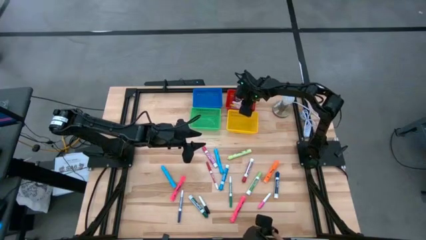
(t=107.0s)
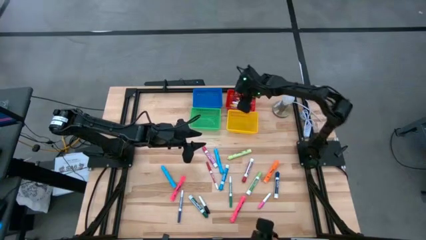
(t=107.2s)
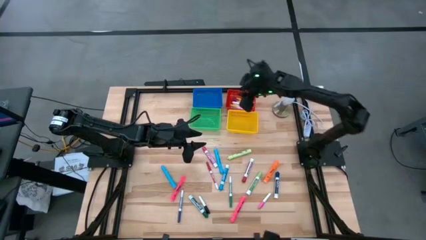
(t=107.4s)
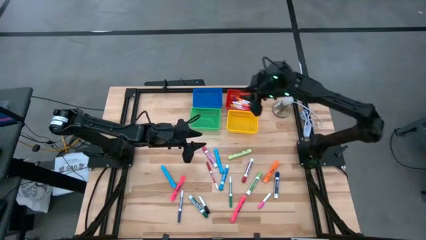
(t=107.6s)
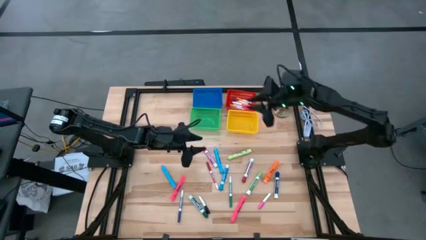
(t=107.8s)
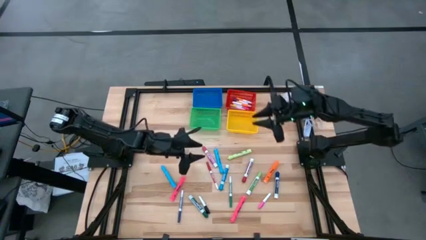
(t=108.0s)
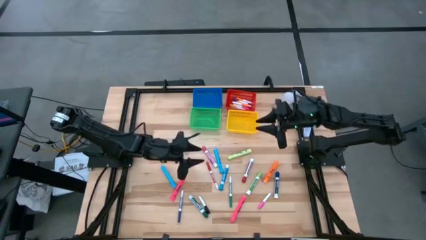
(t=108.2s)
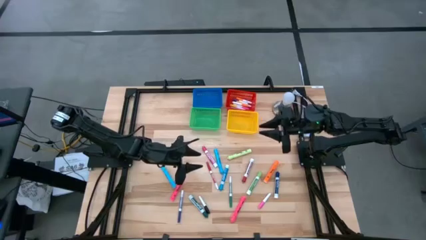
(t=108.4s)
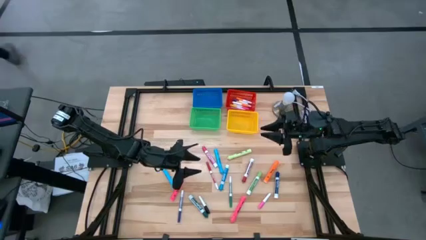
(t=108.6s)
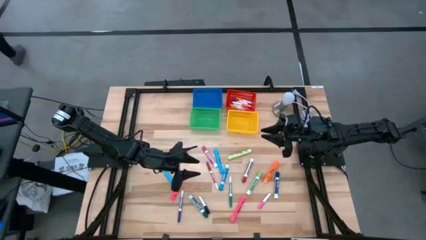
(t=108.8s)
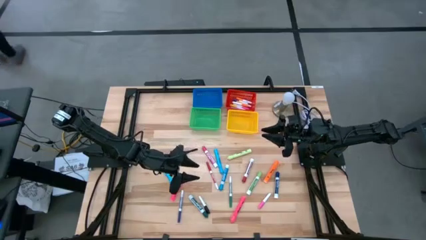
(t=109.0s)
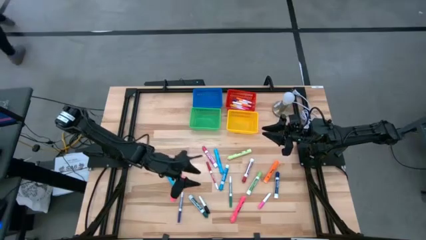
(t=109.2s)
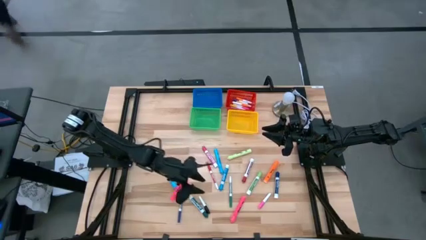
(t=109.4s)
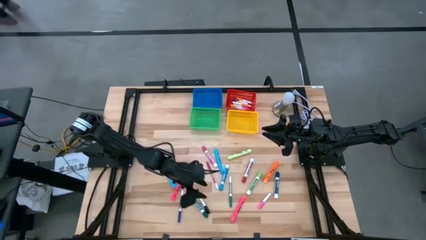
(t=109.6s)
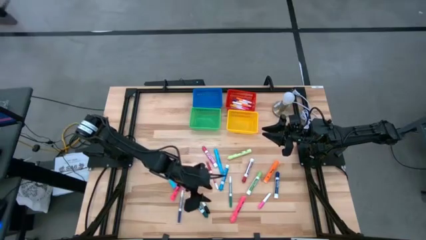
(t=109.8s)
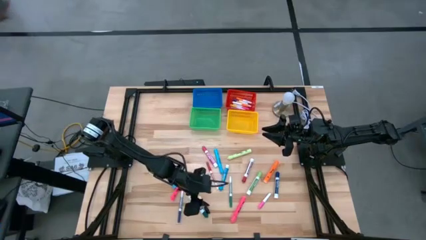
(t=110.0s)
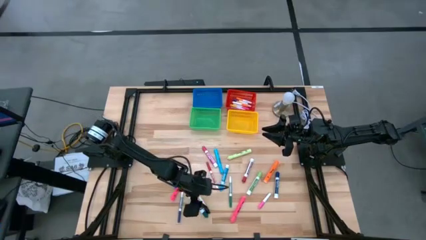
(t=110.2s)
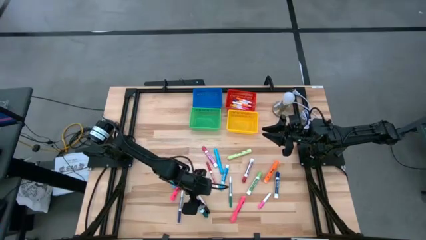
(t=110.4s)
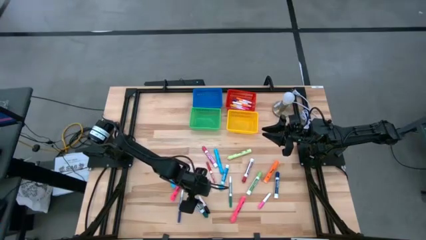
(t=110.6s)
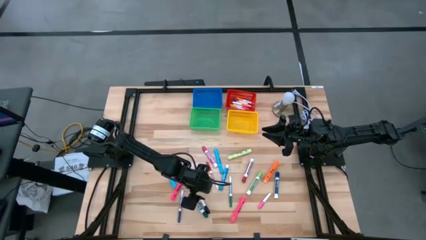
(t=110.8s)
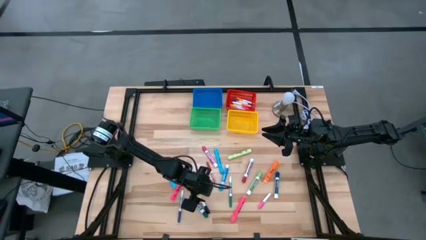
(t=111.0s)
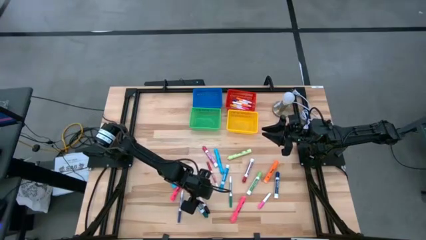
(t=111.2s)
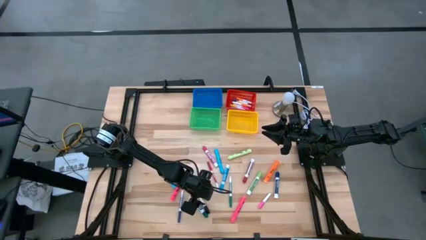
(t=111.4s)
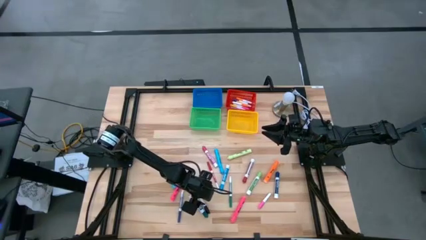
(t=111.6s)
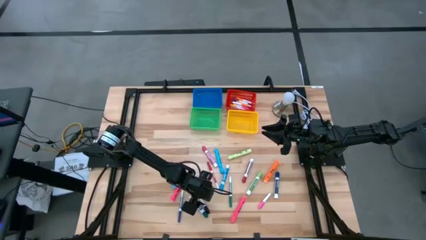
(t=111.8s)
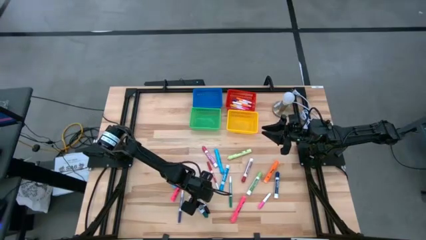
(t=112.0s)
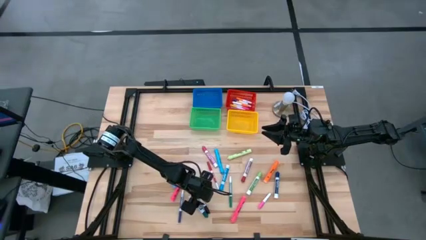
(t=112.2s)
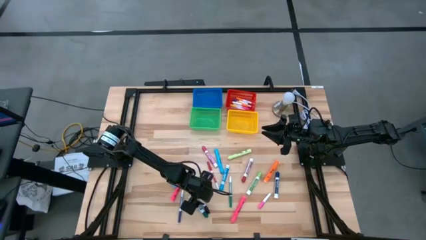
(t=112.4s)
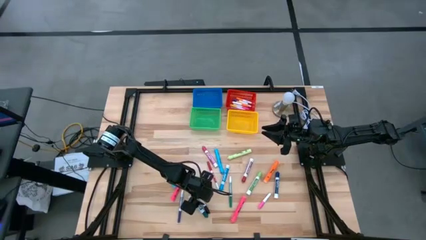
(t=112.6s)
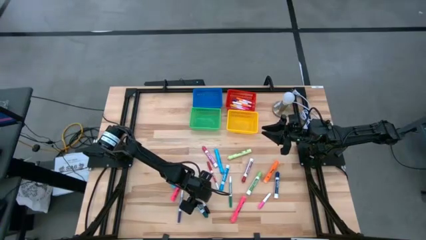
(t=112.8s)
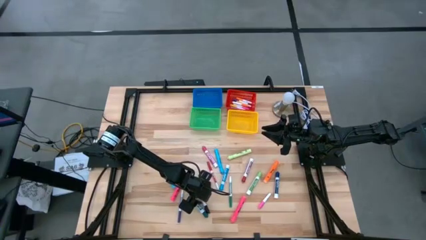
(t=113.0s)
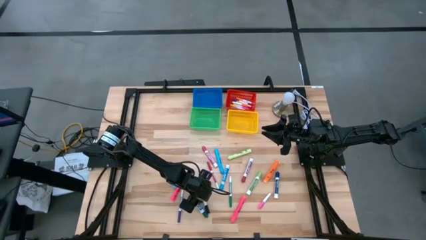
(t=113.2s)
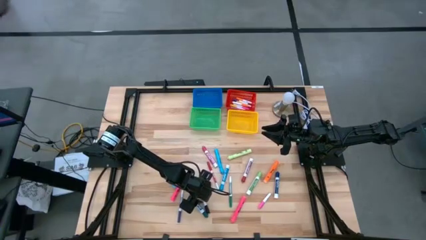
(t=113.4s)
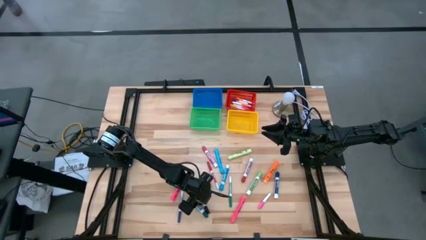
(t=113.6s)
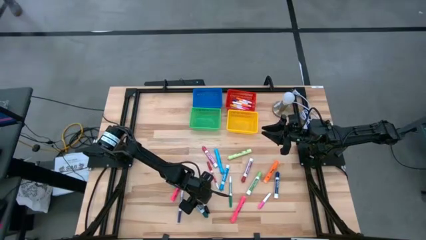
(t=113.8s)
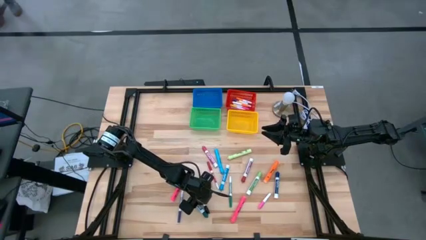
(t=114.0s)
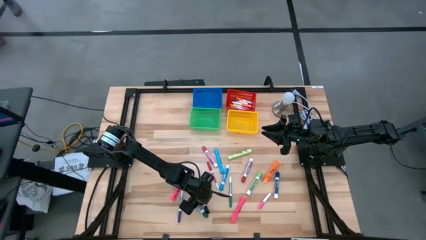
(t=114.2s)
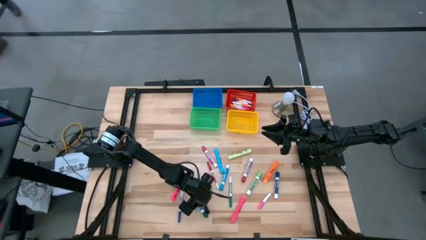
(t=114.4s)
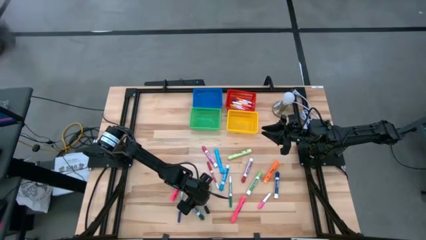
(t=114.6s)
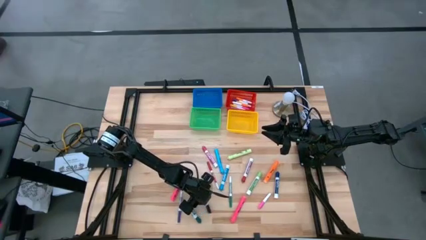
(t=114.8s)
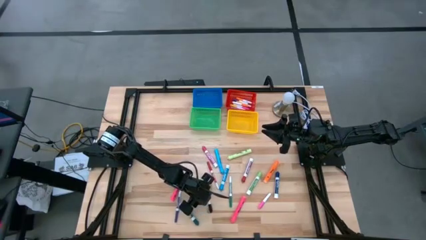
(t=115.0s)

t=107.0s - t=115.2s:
Task: Pick & Place Markers
Put the black pen into the red basket

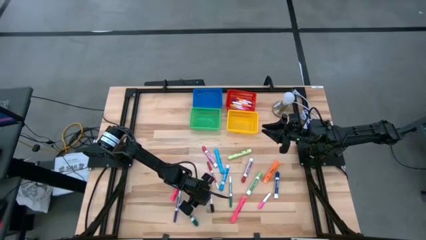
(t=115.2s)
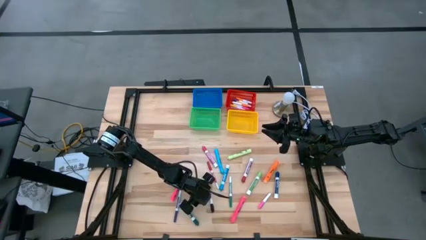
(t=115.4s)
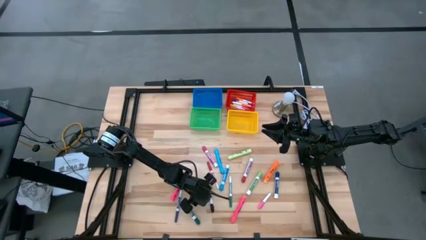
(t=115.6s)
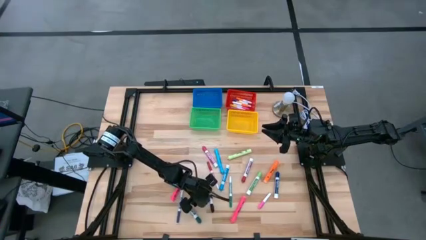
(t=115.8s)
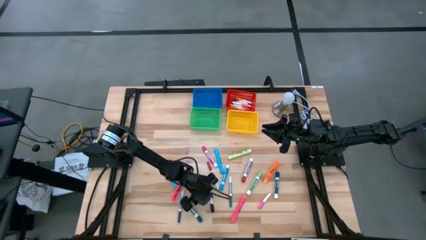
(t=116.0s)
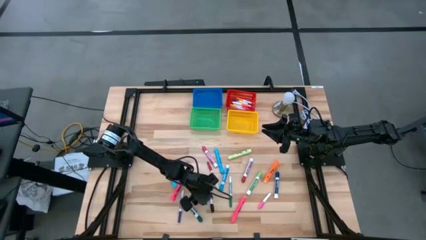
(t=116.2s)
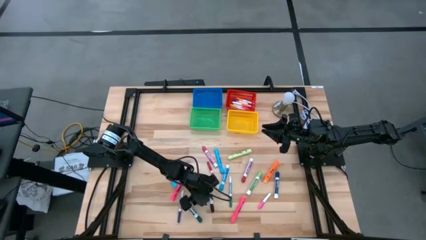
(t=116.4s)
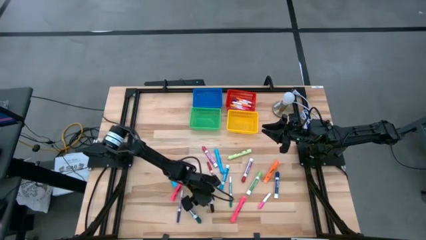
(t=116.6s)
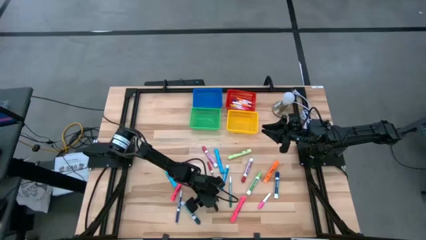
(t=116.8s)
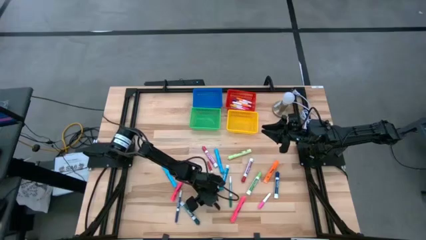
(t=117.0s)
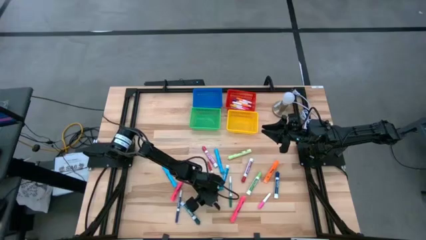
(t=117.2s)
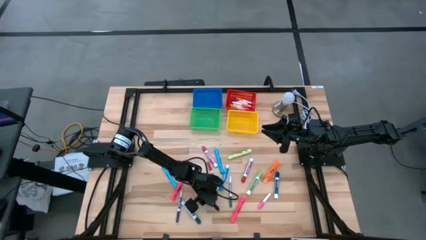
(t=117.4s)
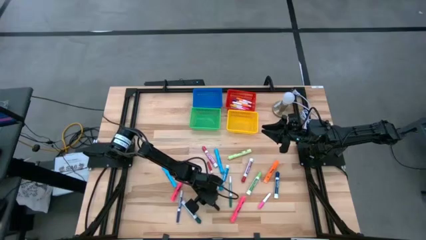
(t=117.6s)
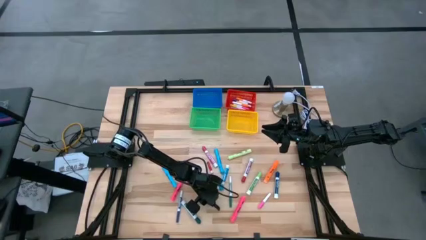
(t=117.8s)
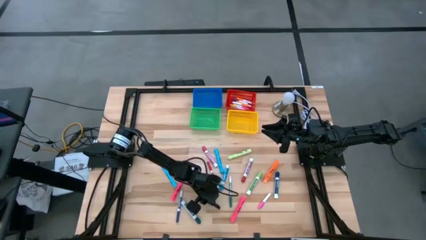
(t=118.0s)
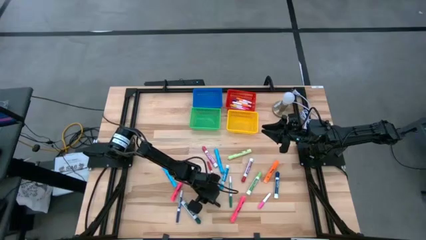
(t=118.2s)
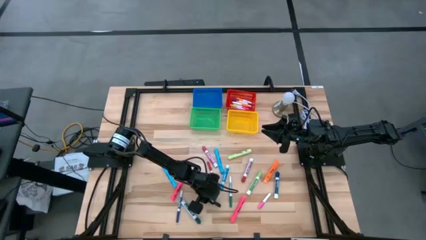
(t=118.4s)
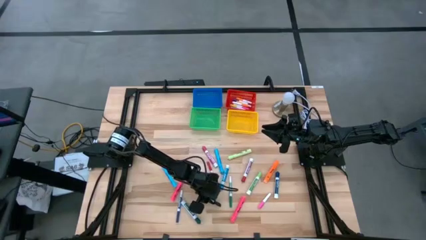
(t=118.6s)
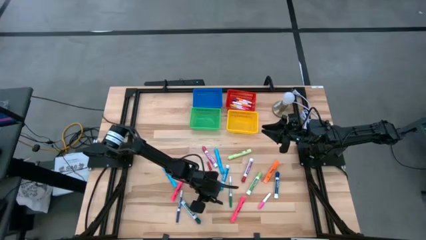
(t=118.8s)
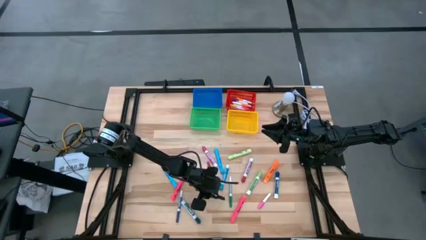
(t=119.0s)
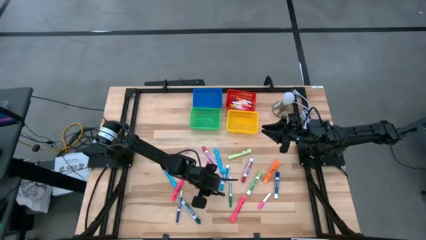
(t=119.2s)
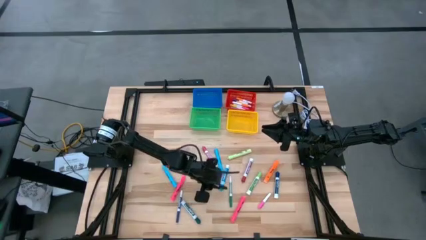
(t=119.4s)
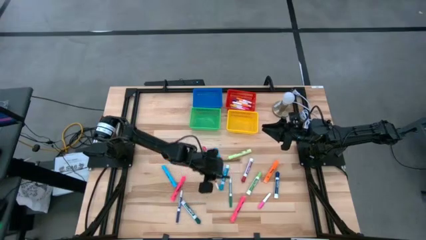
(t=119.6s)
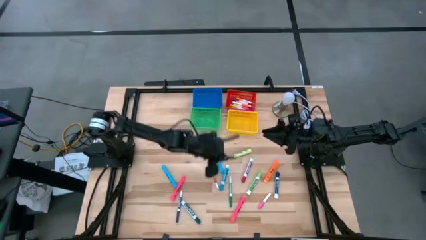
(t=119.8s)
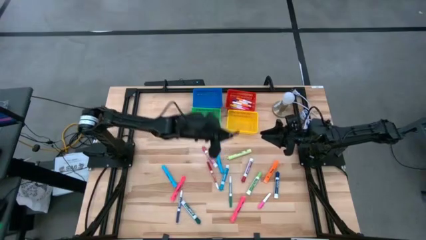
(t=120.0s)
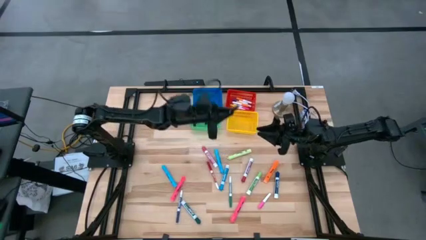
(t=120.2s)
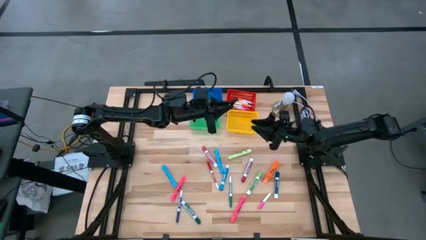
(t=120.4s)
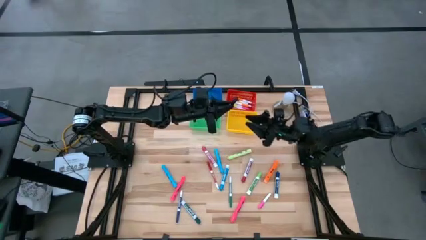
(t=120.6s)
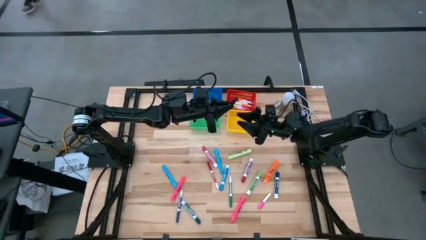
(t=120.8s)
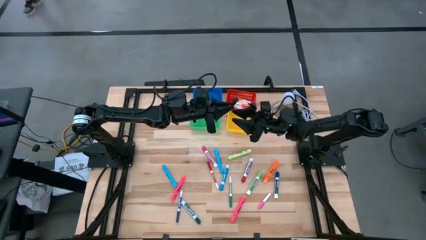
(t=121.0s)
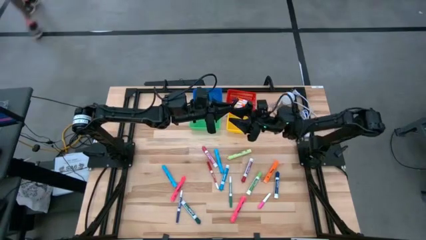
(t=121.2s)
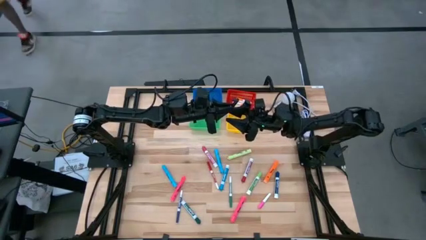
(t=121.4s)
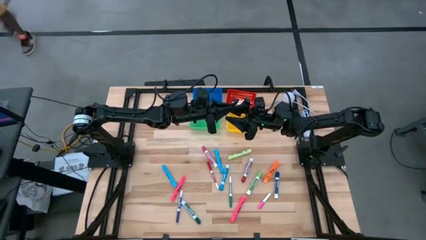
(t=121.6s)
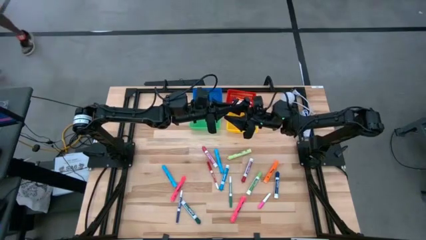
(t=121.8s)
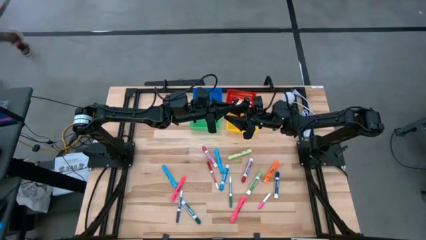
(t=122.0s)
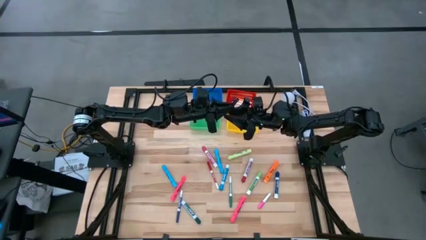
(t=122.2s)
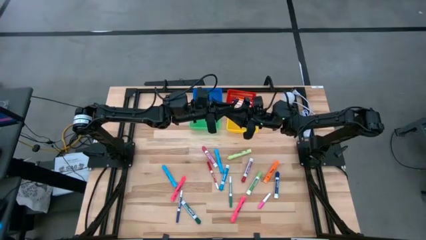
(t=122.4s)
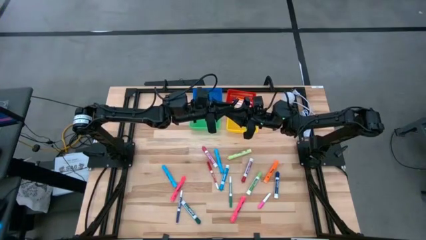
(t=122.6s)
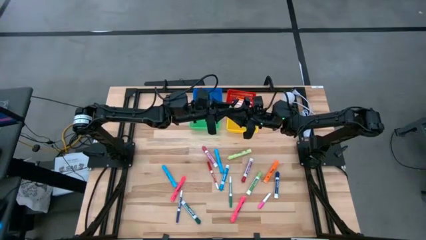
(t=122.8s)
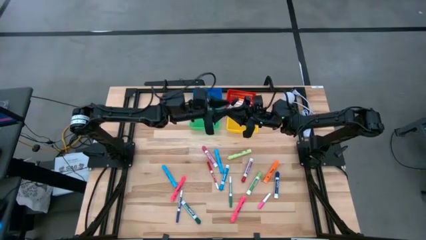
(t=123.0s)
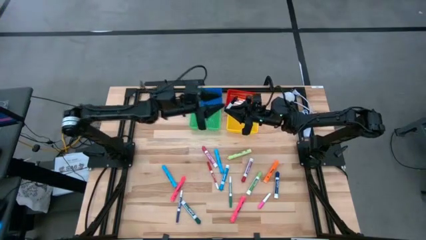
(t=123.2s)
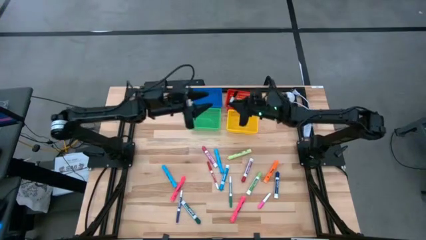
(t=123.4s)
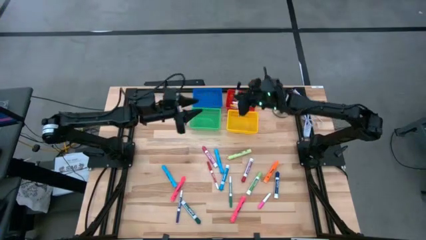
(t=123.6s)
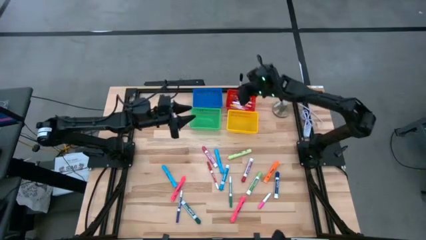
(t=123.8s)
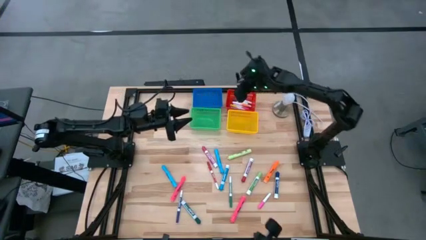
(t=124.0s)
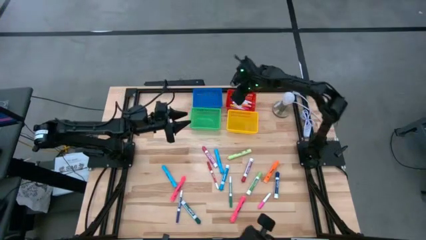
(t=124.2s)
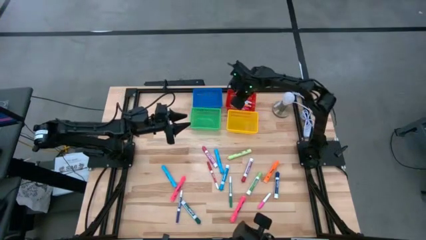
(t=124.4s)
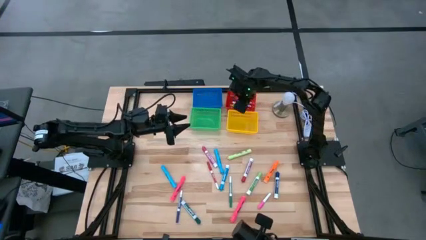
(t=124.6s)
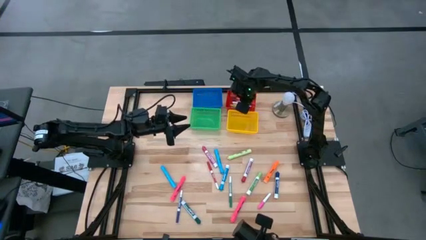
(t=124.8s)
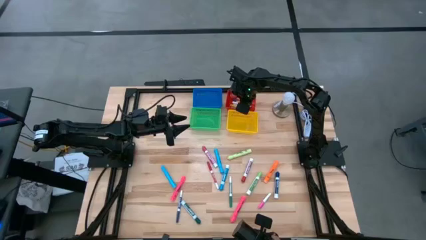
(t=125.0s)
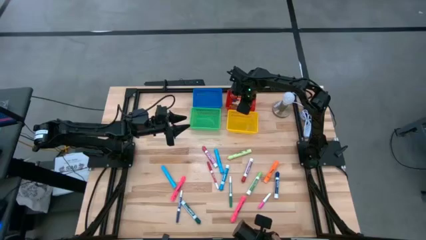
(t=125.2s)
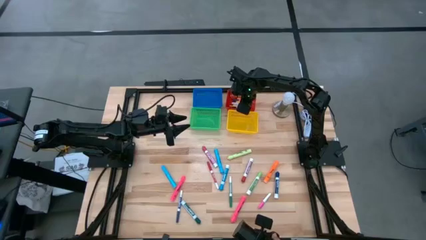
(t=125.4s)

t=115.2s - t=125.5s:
Put the black pen into the red basket
